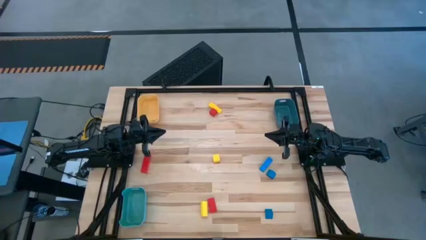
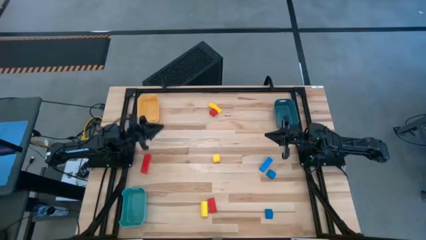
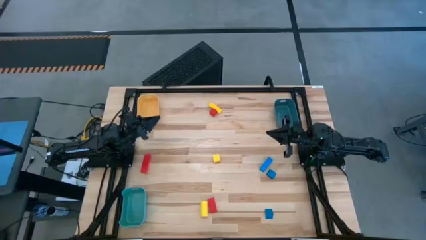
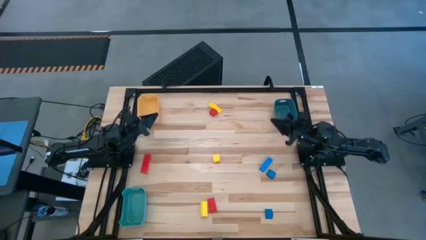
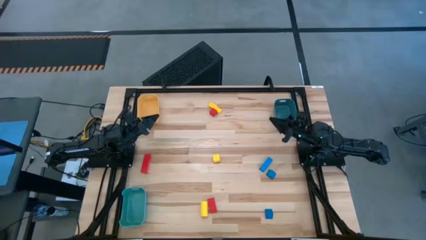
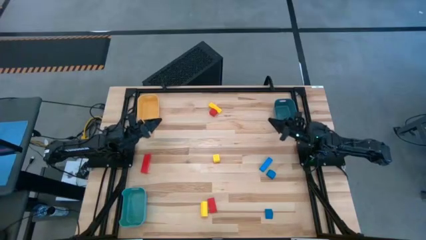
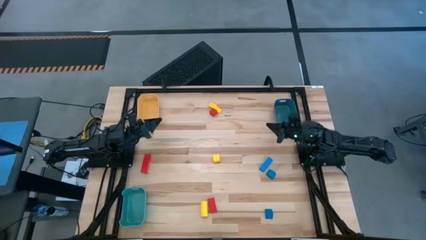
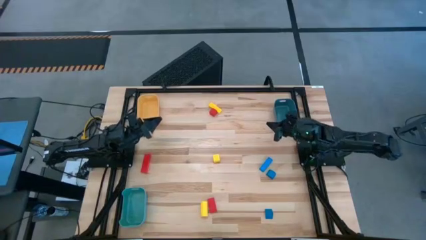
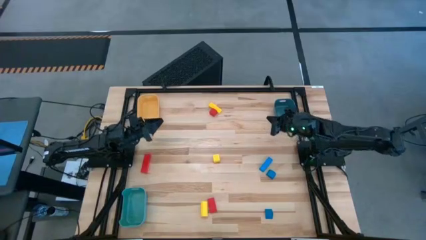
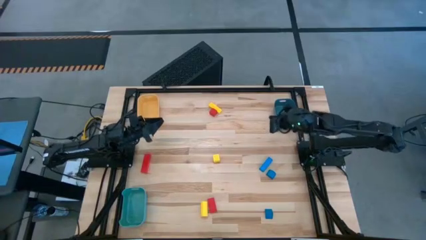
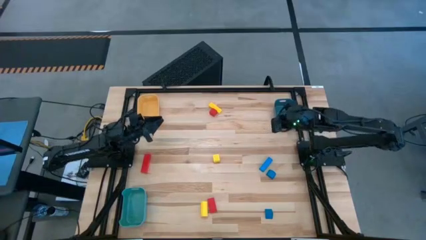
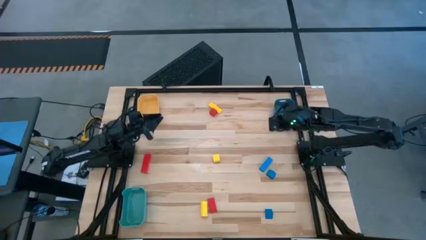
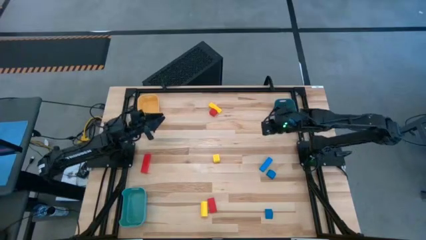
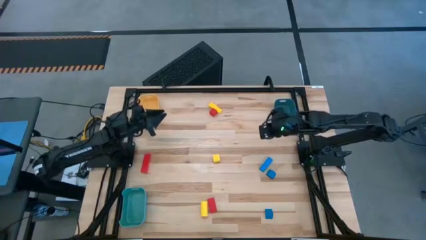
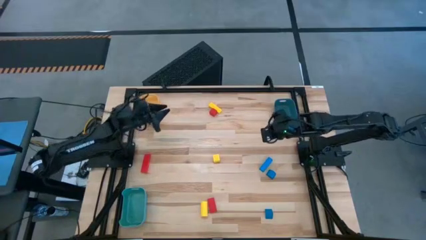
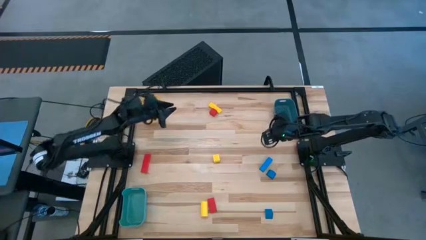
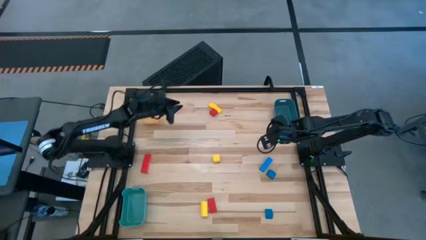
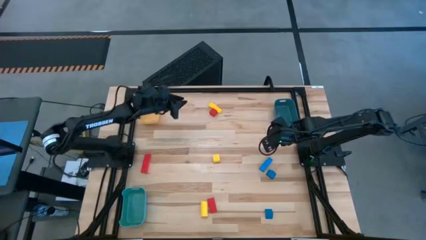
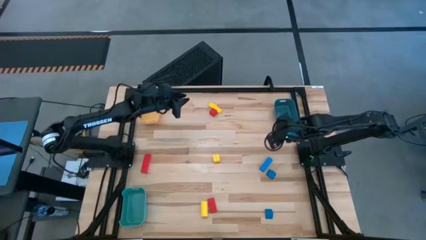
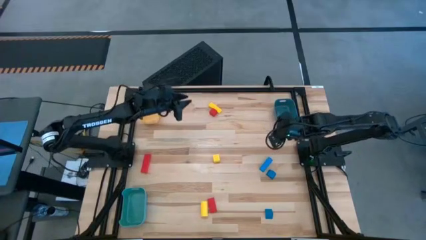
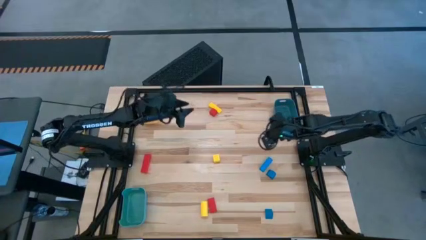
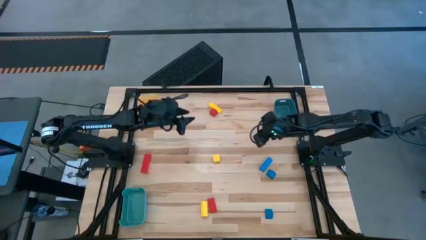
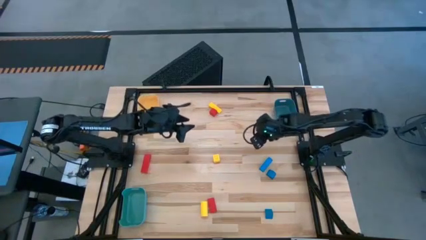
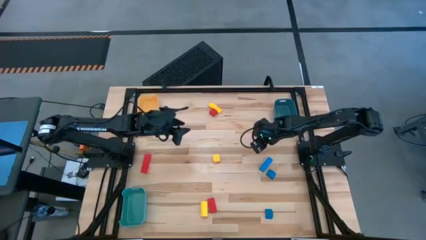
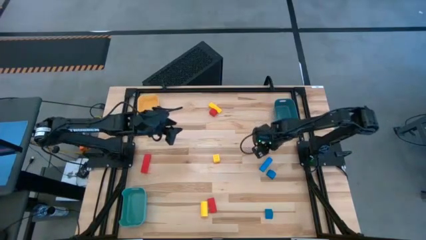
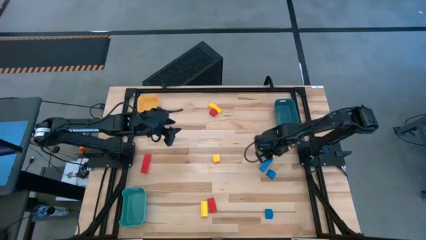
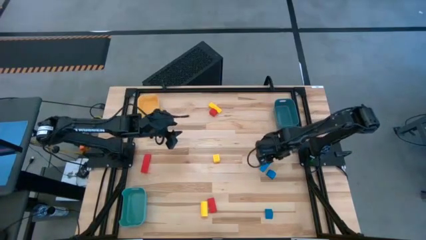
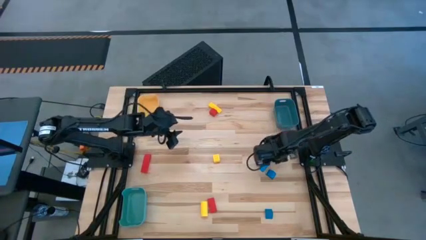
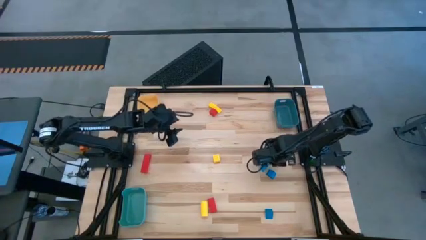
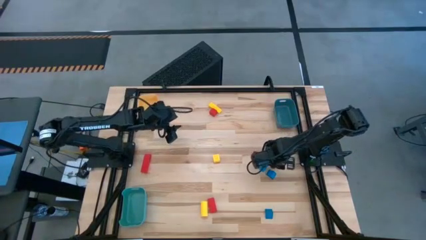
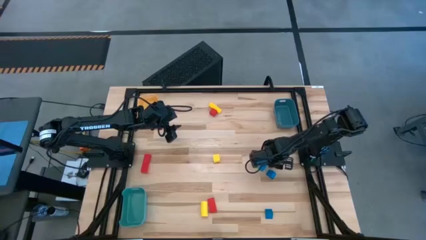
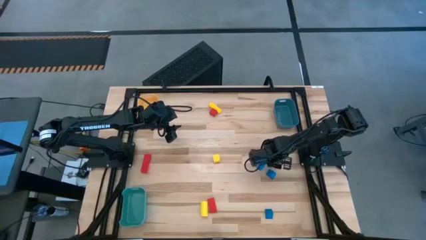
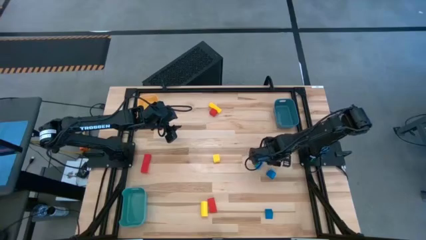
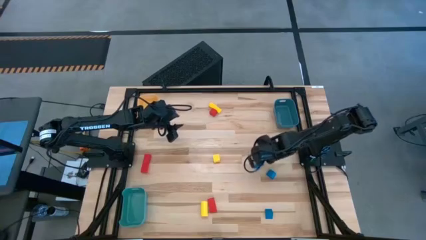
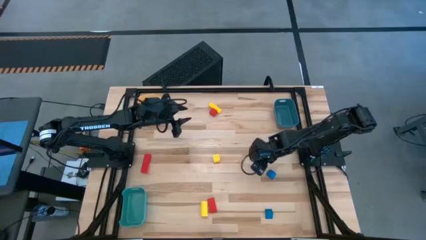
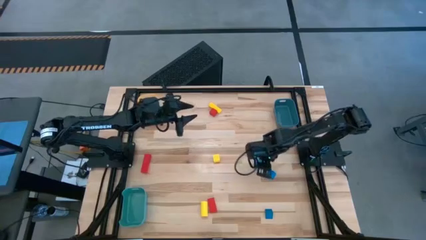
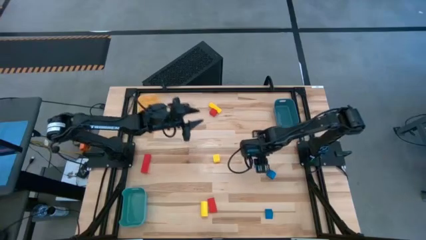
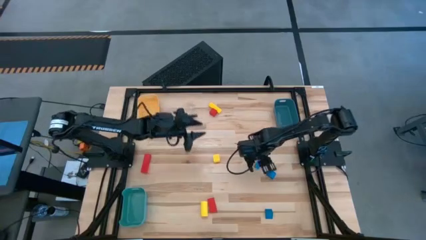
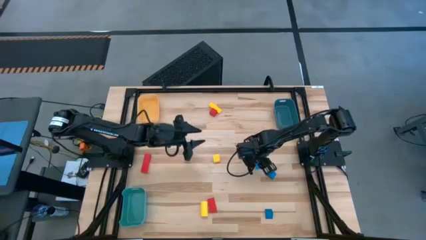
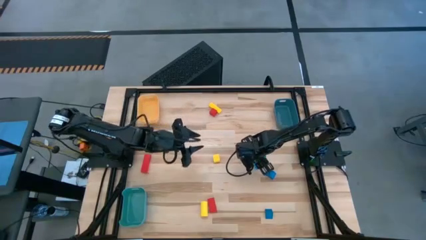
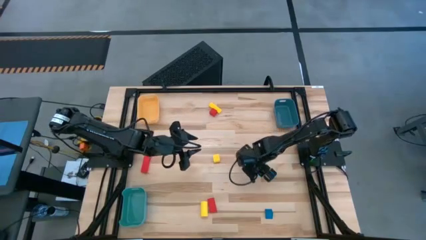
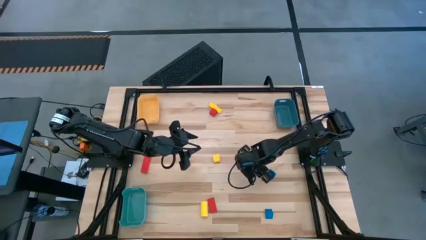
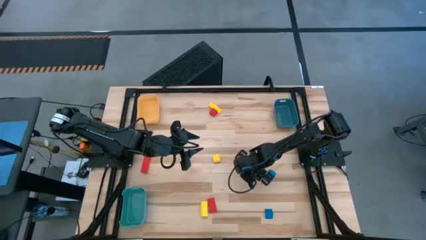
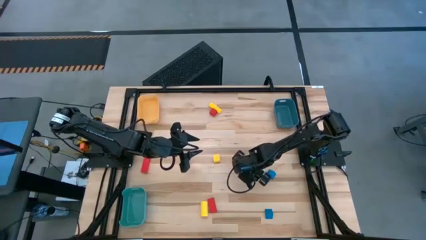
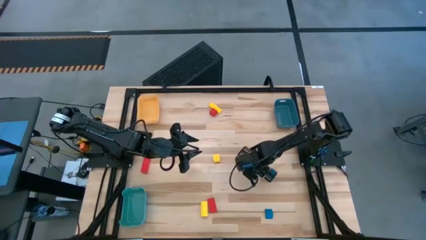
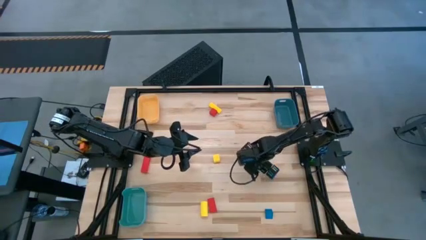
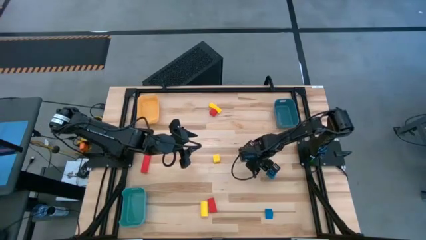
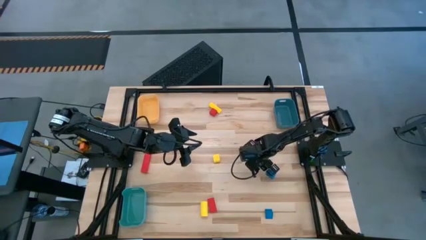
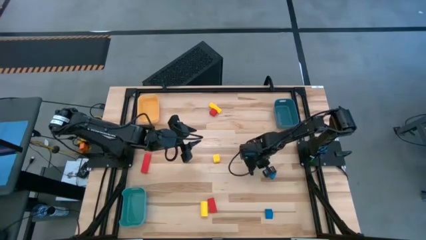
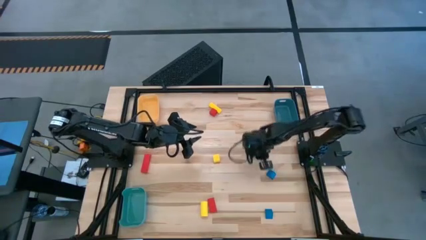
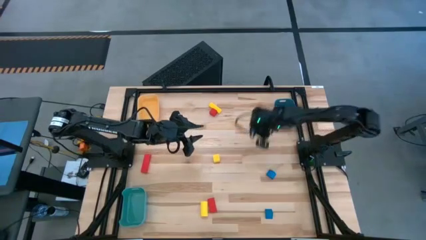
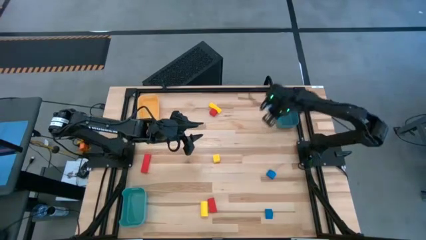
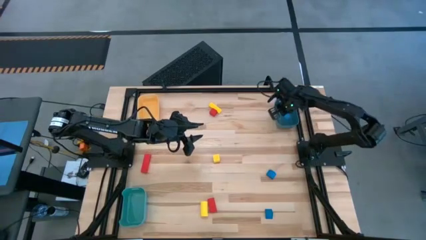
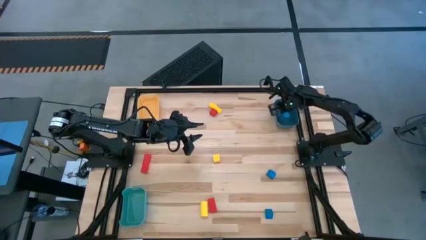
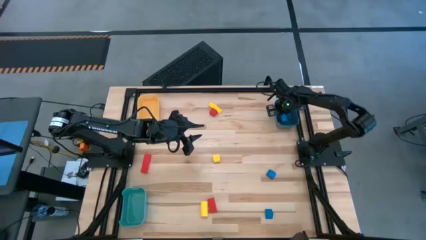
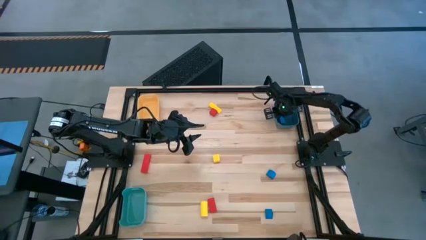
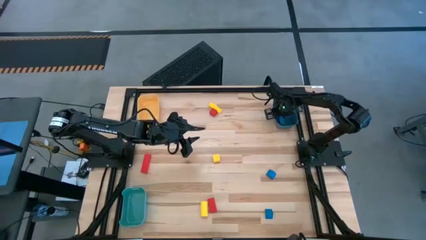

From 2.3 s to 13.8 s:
Task: Sort & place blocks by color
Put the top blue block into the blue bin

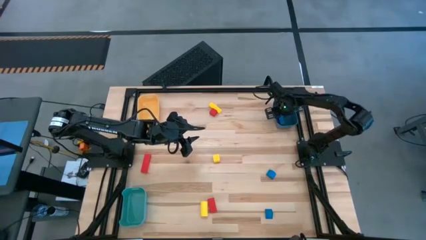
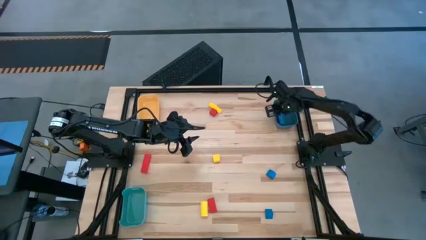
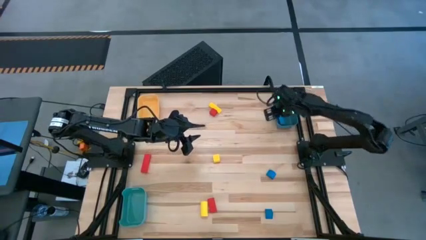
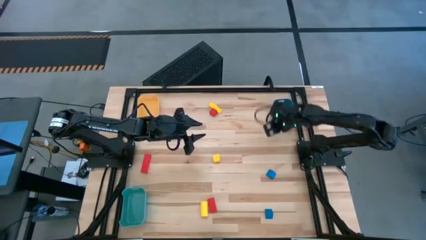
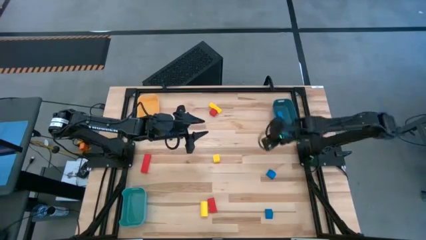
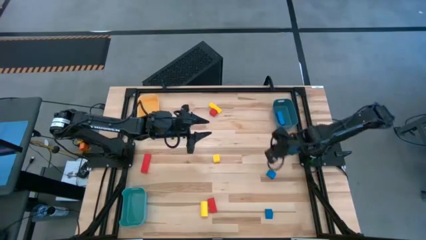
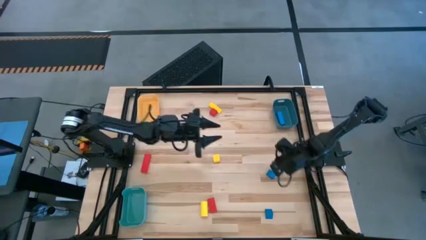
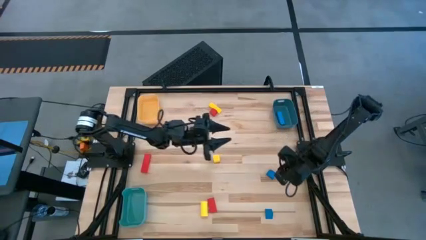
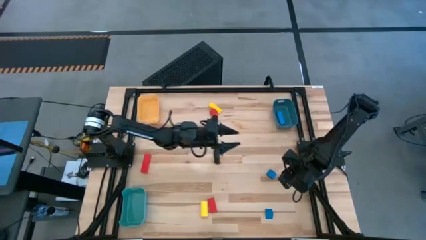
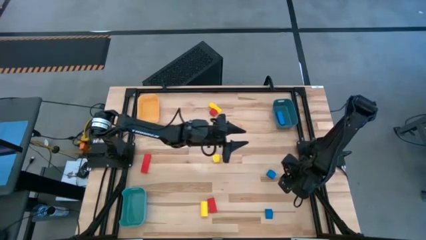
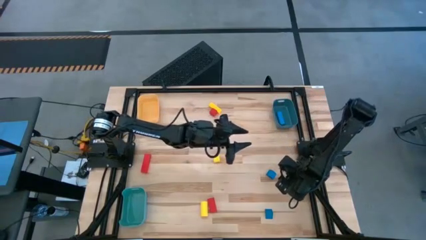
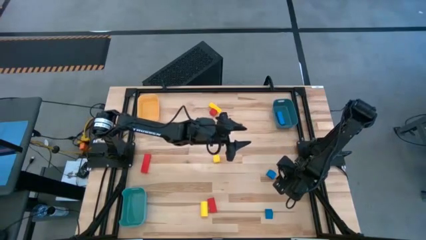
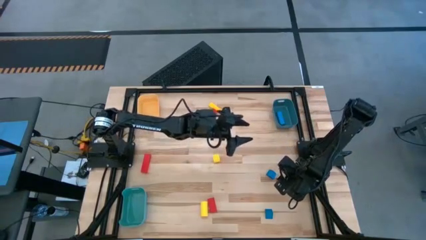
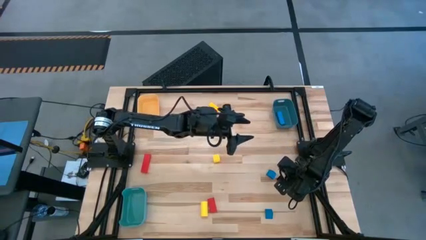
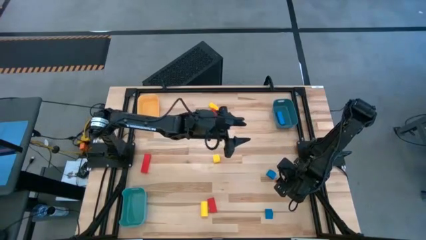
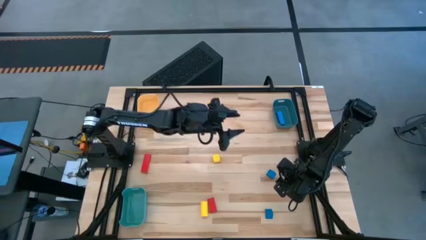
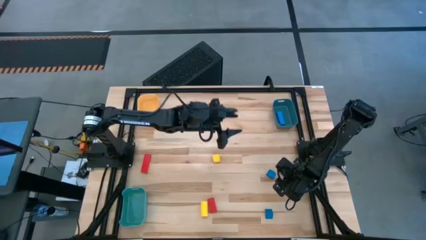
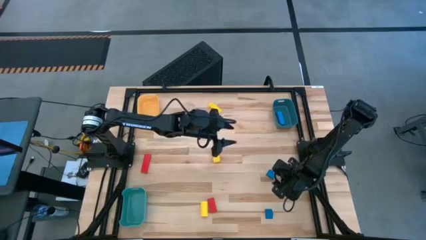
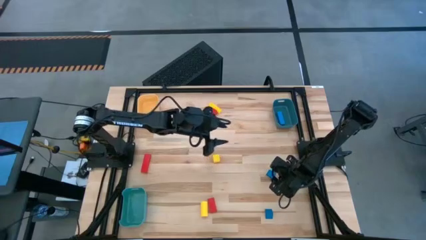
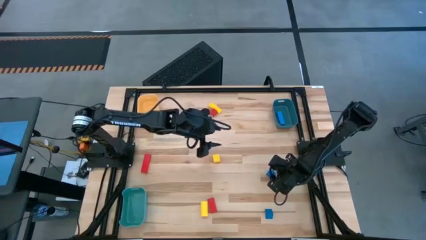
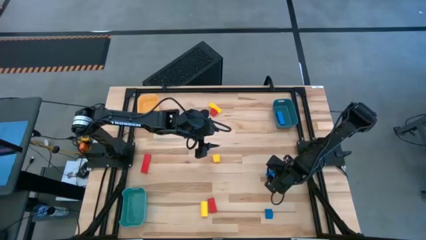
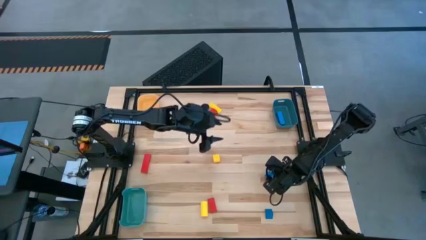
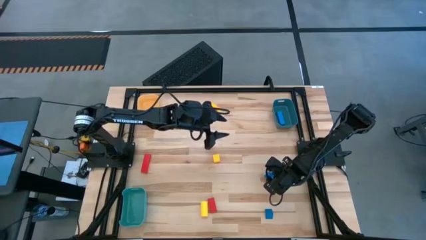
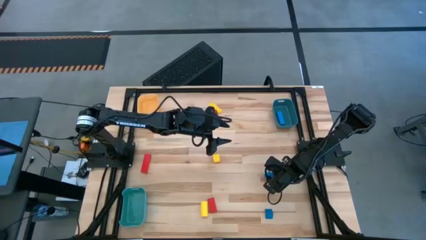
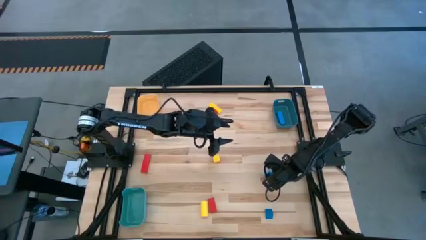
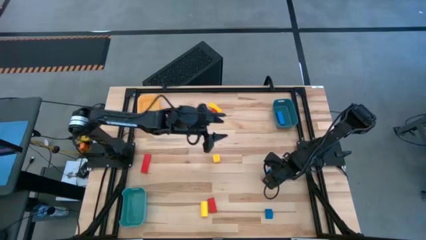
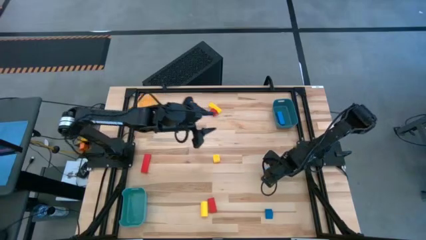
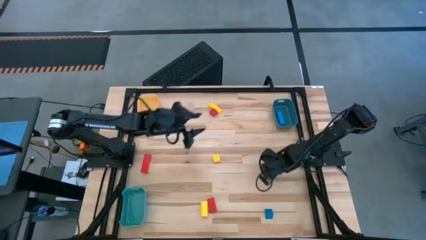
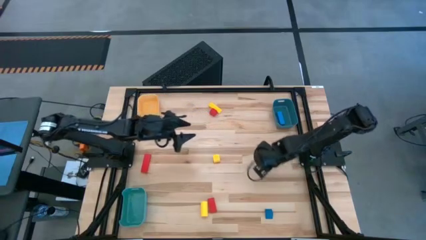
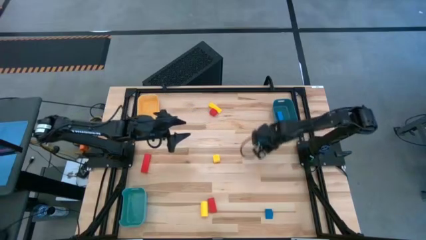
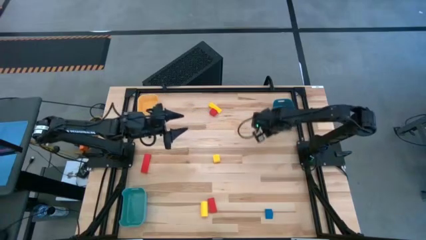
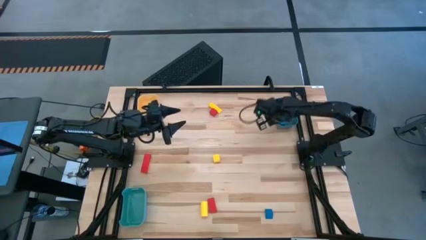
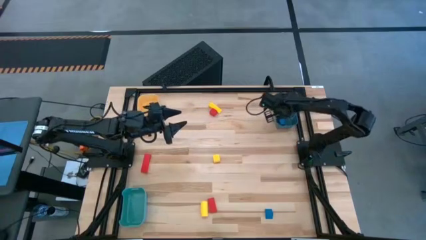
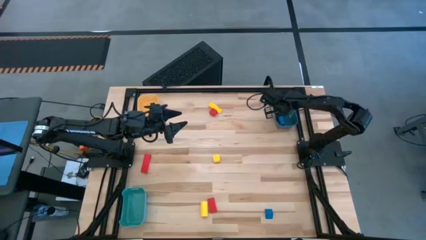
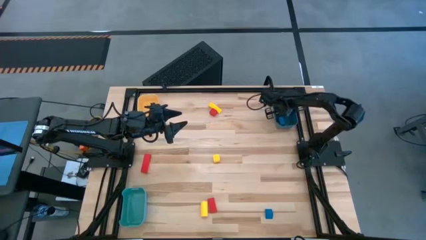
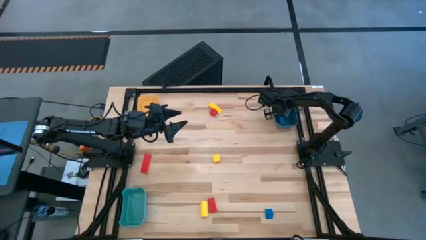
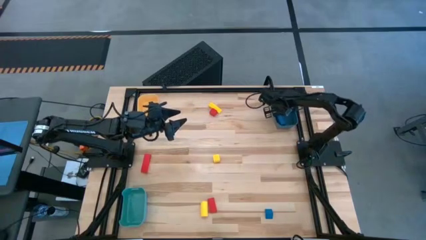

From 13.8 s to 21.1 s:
Put the top blue block into the blue bin
